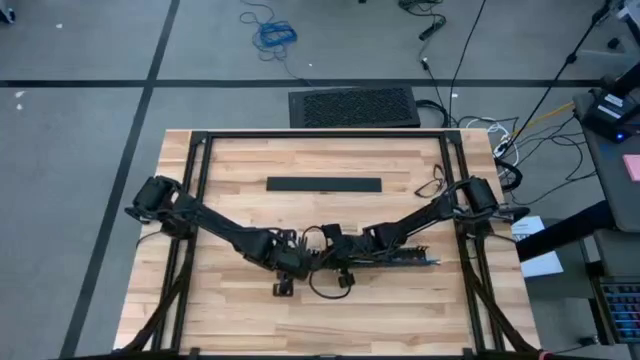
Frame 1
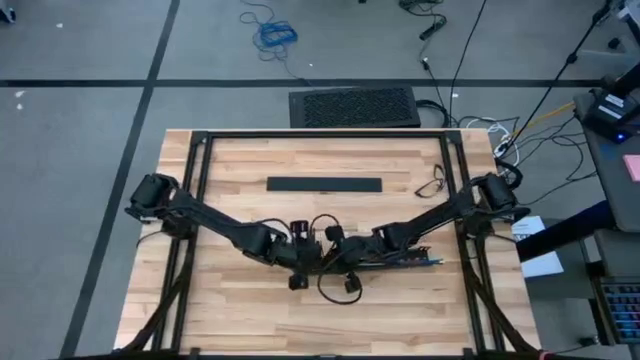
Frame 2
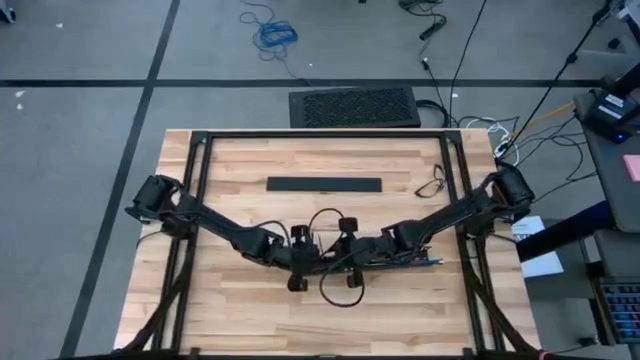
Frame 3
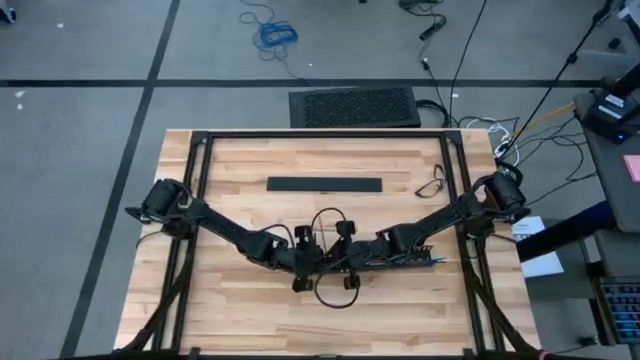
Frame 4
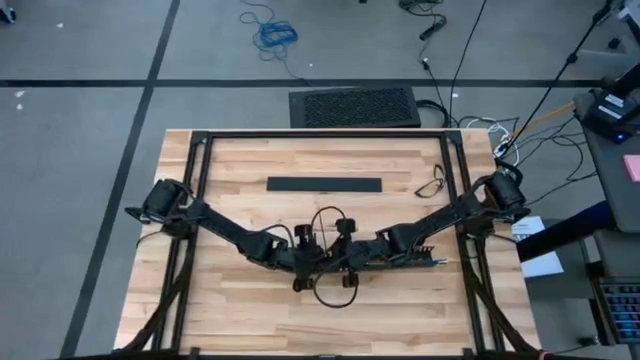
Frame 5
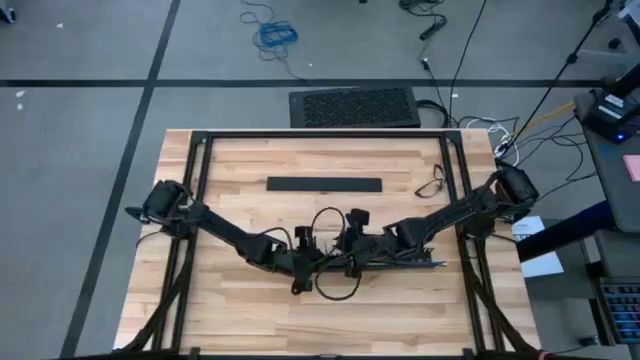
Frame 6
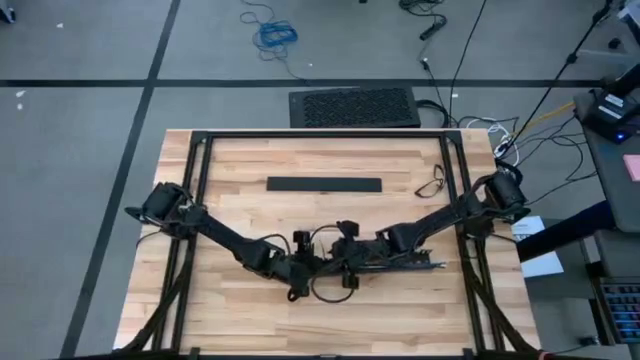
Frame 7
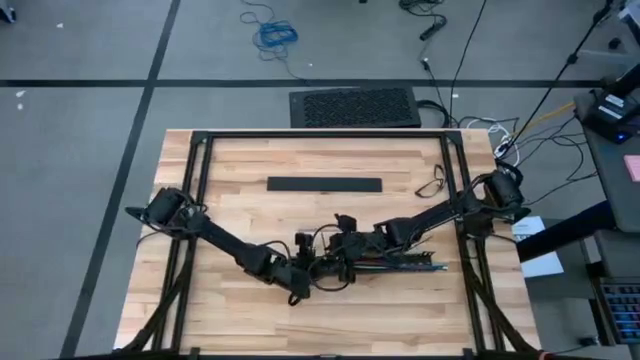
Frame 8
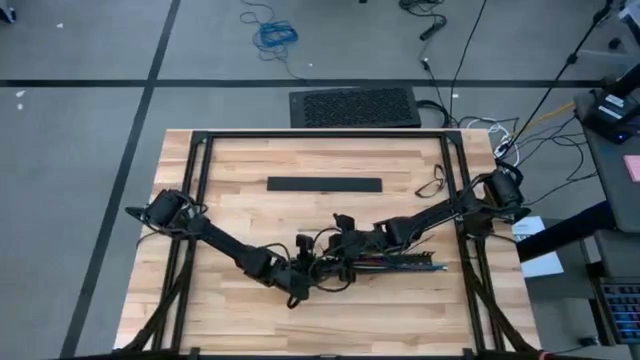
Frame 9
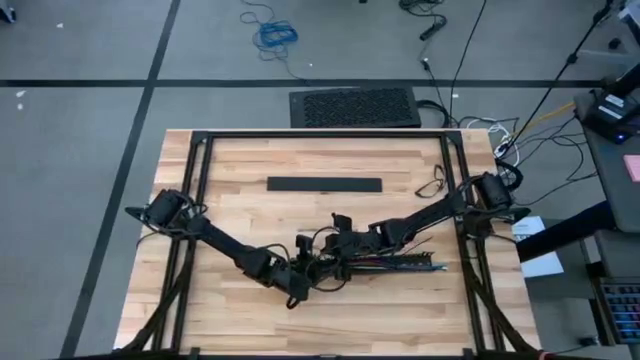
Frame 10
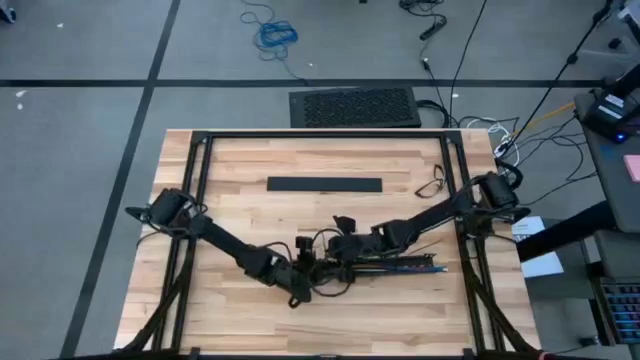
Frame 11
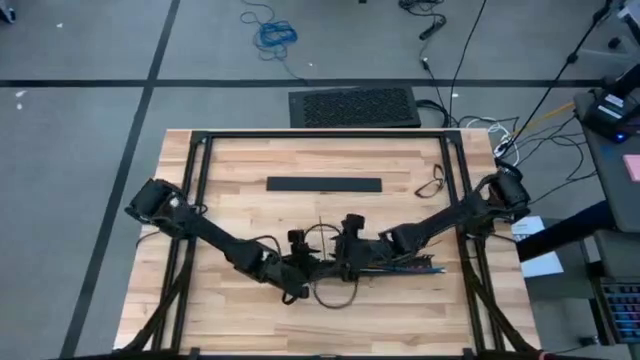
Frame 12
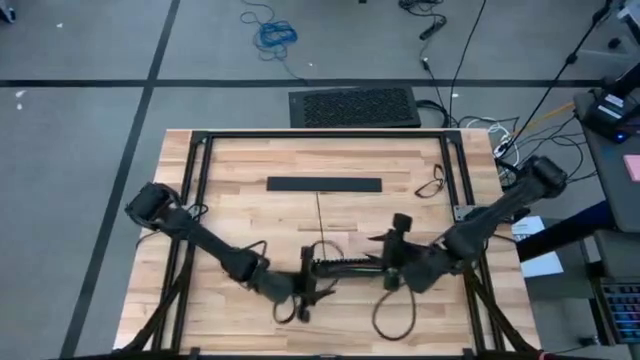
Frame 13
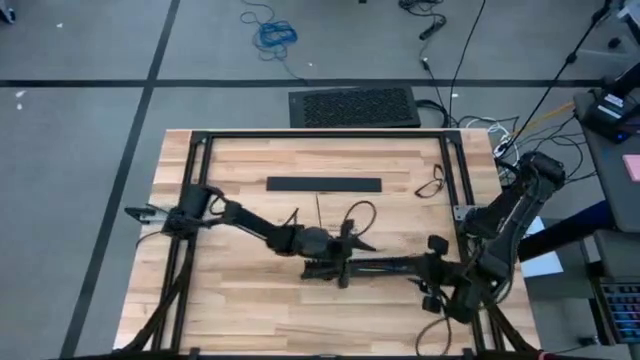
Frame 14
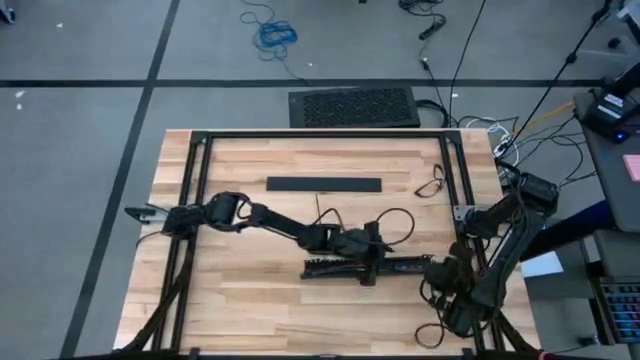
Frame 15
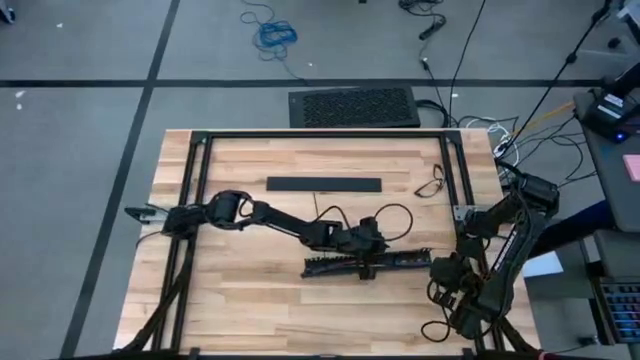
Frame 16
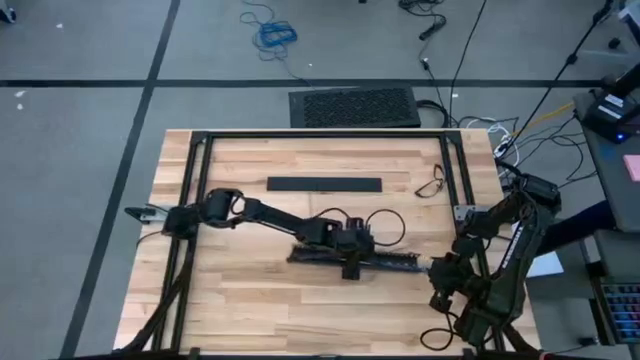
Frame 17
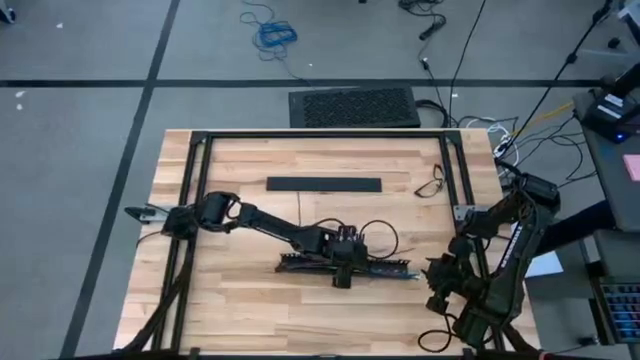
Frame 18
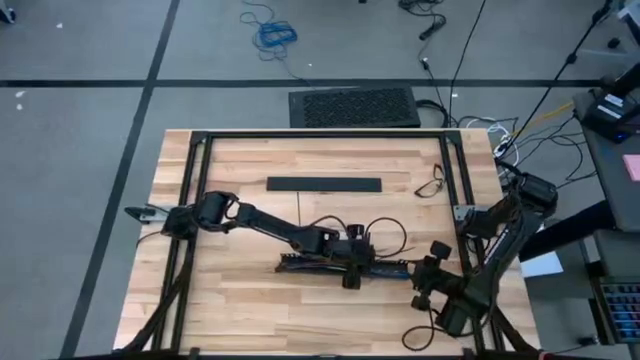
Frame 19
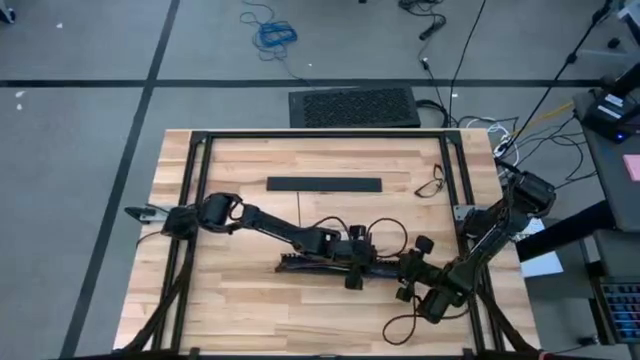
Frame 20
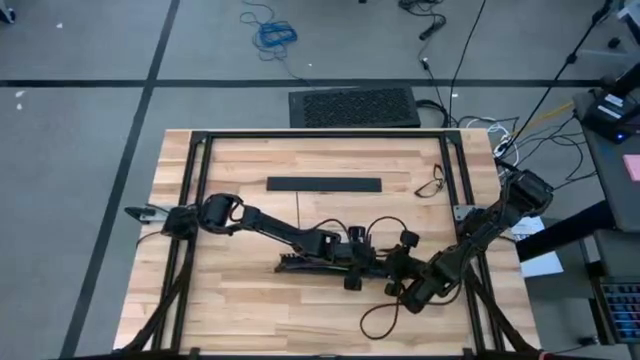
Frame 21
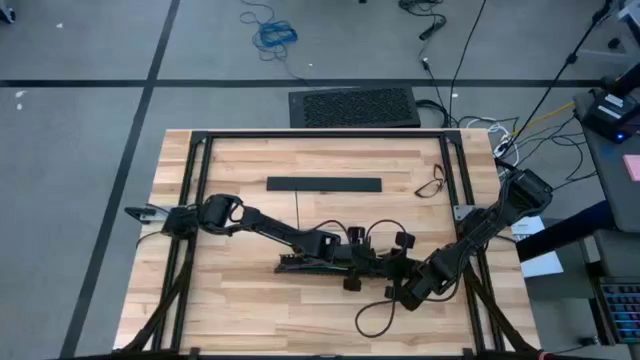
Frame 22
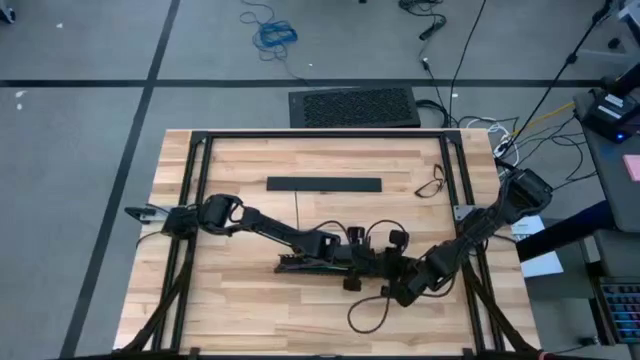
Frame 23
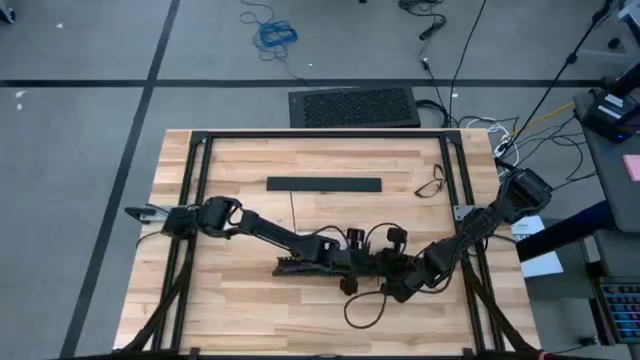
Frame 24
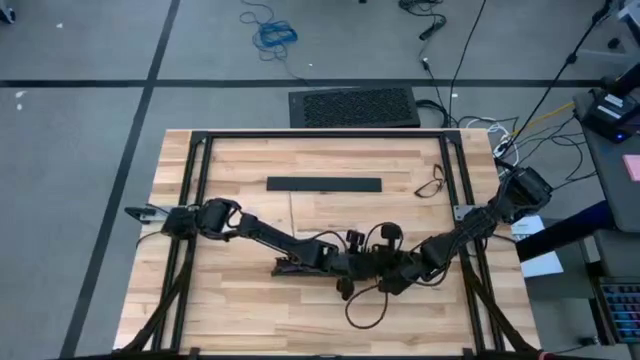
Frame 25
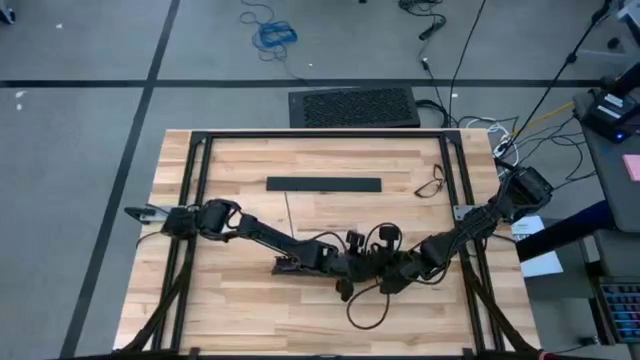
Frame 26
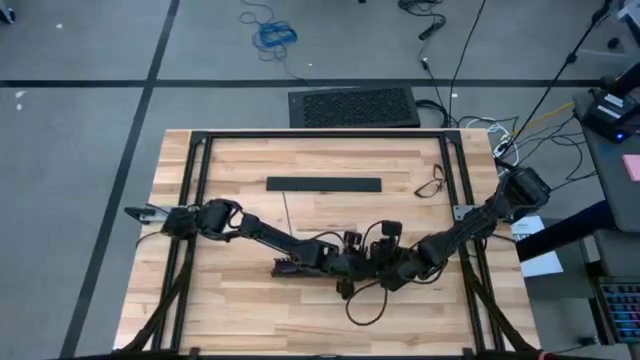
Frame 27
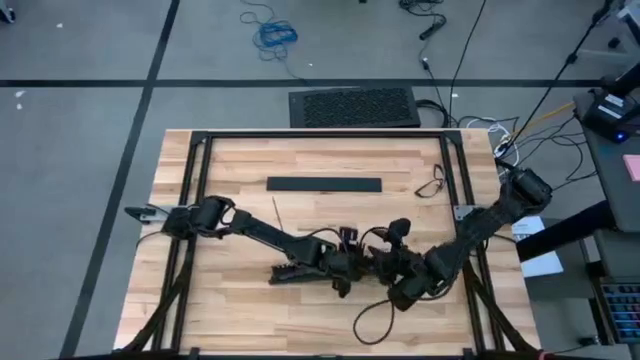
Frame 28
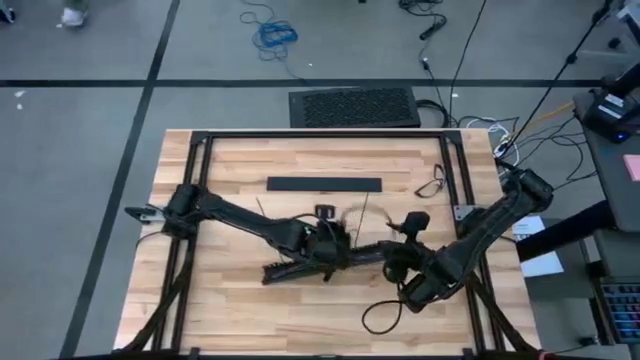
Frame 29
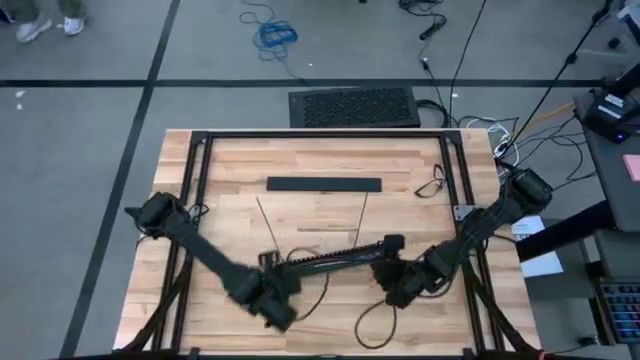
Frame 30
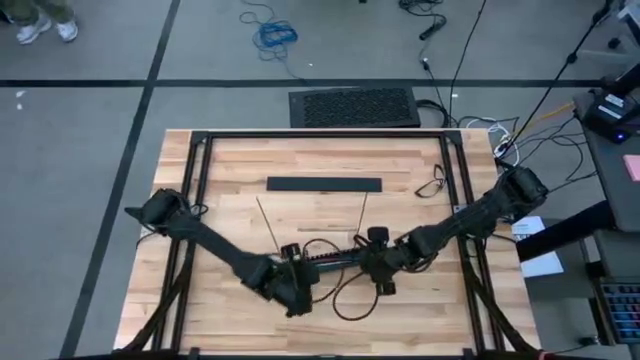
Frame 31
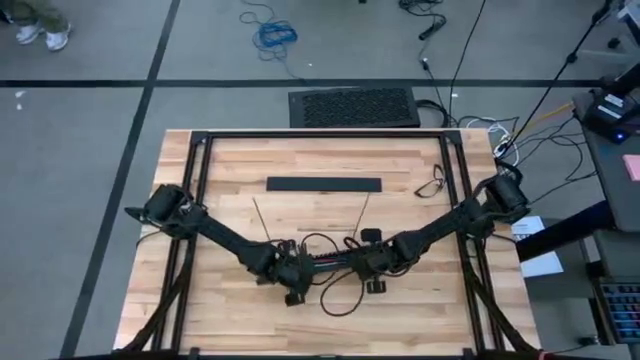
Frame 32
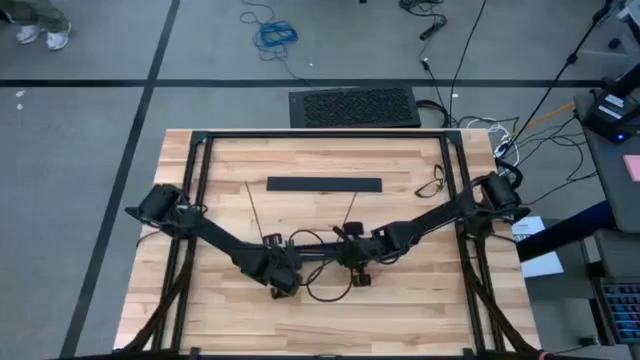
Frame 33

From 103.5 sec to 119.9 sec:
Task: Ziptie cables
Put the zip tied cables into the black cable duct

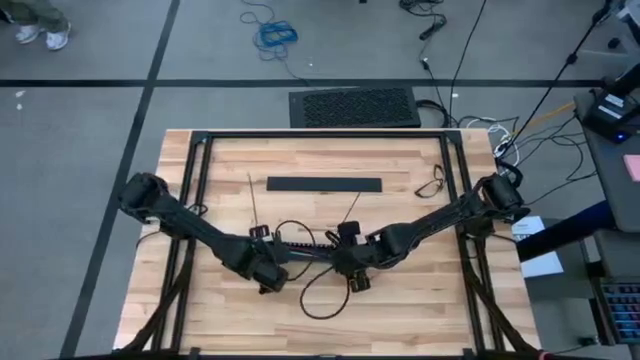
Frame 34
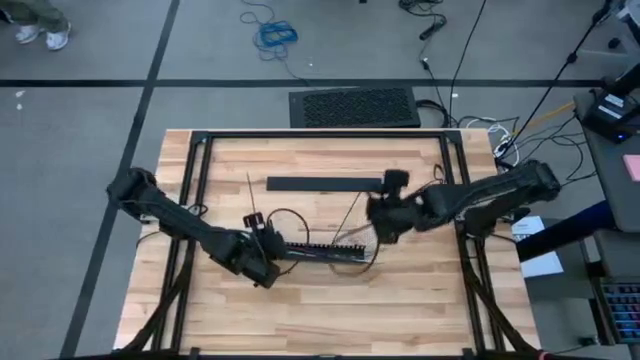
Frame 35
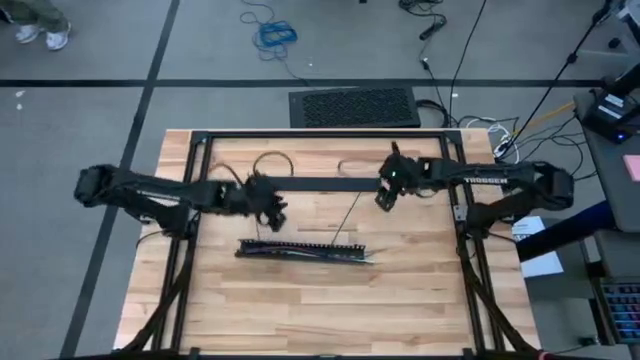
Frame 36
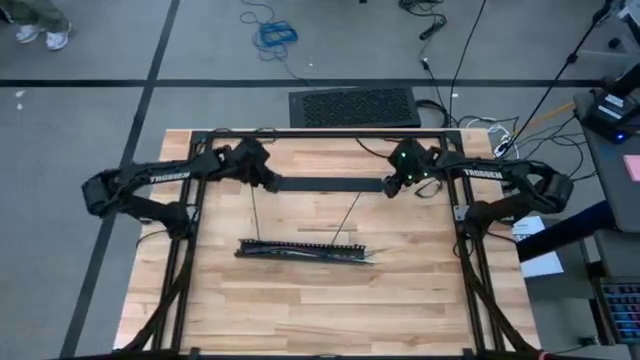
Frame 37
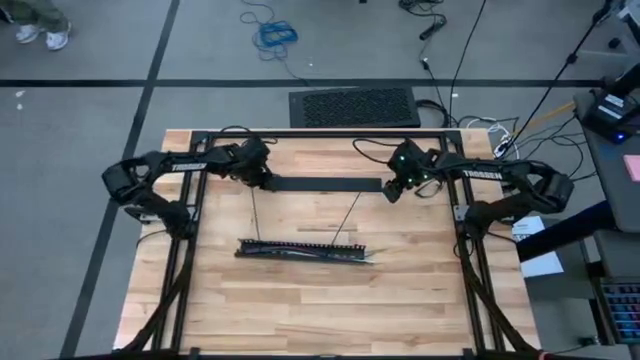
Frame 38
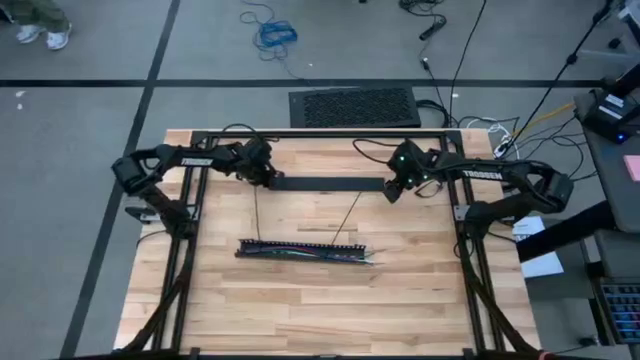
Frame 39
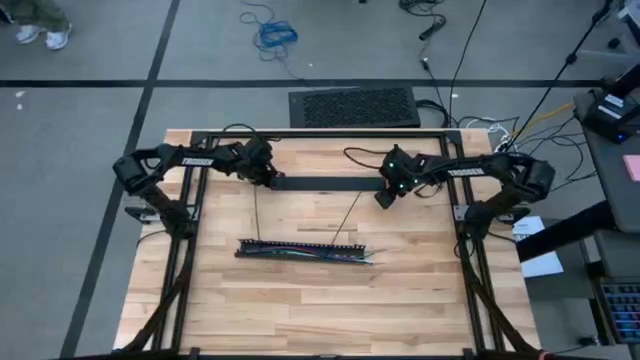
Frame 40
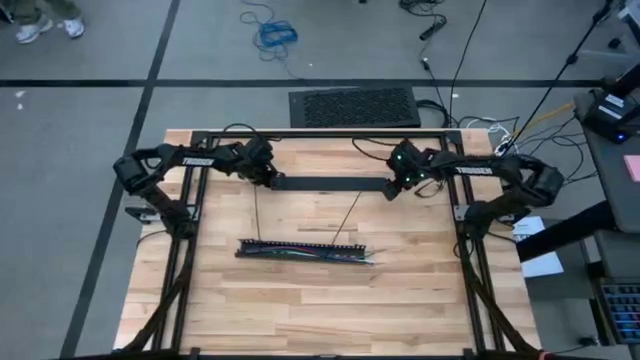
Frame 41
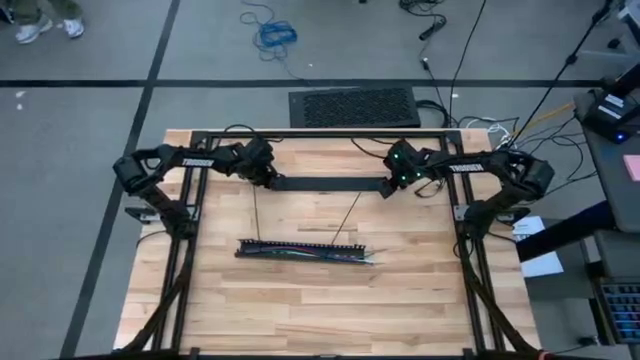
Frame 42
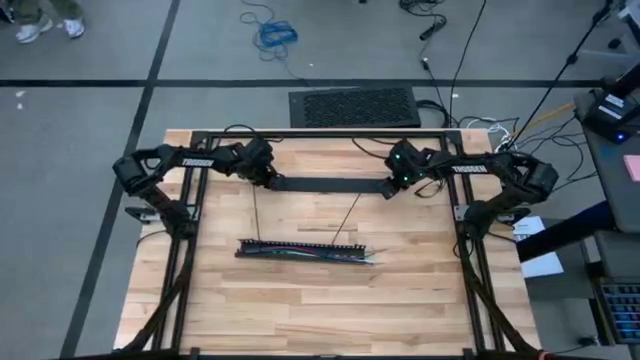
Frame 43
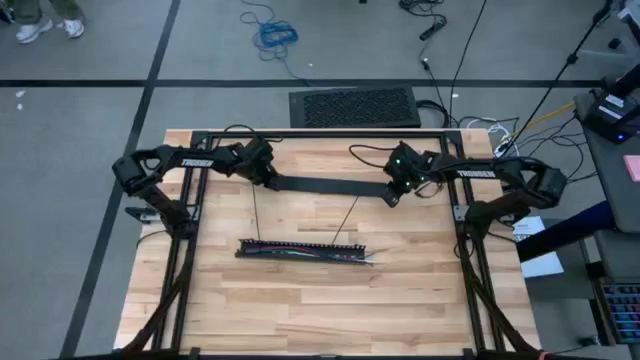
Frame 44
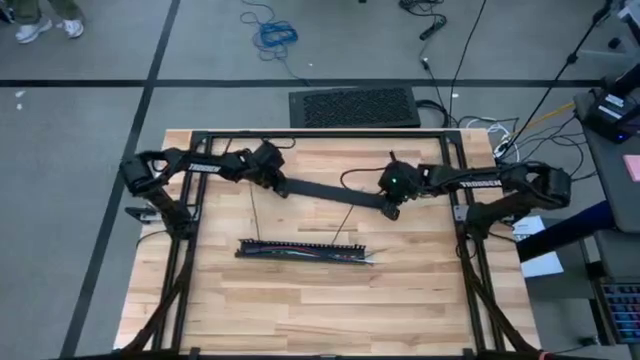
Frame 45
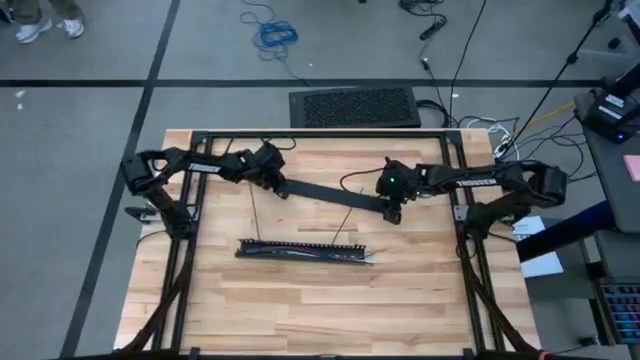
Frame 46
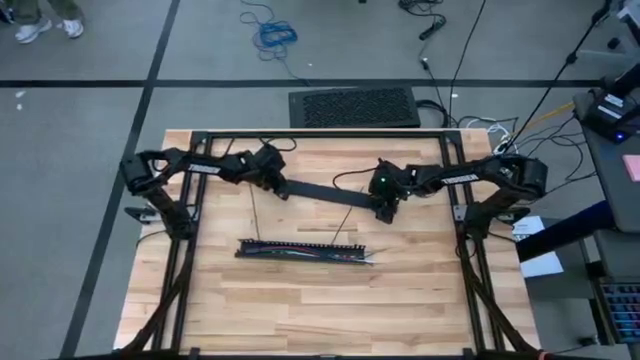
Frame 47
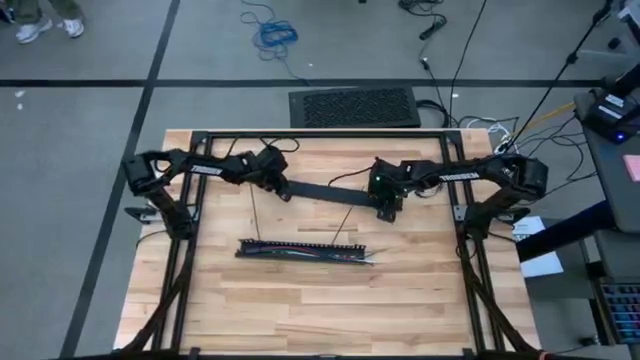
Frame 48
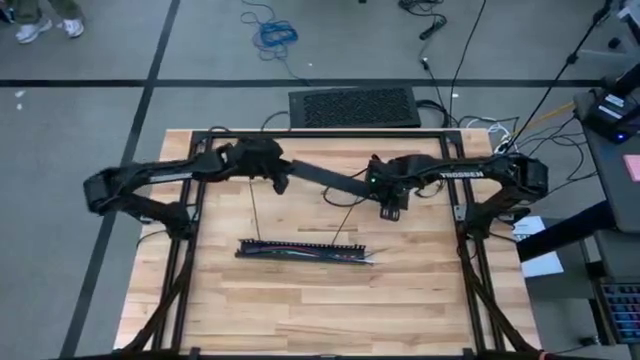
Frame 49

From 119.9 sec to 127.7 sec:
Close the black cable duct
